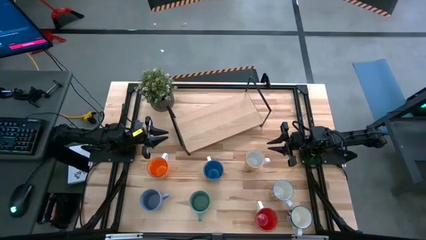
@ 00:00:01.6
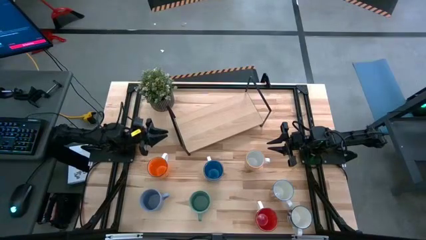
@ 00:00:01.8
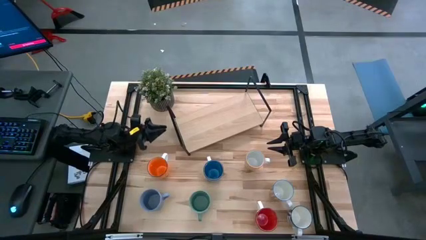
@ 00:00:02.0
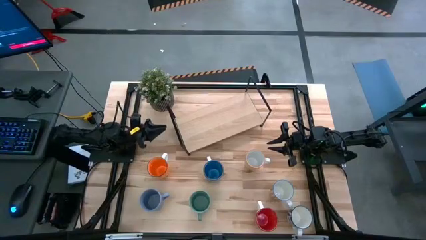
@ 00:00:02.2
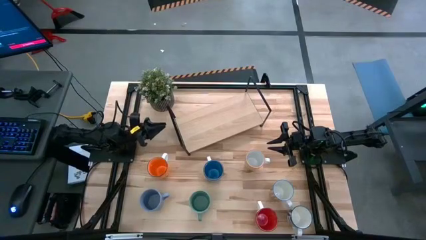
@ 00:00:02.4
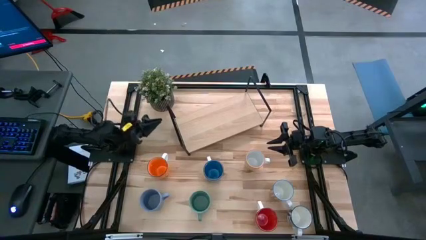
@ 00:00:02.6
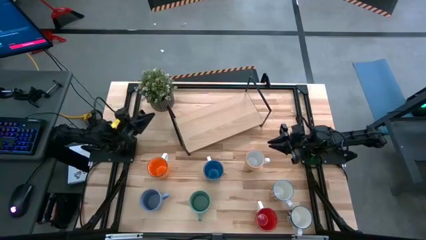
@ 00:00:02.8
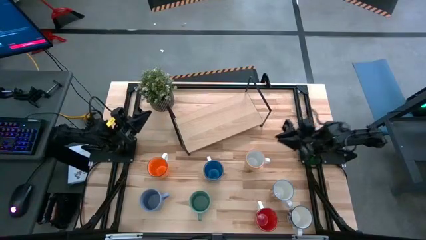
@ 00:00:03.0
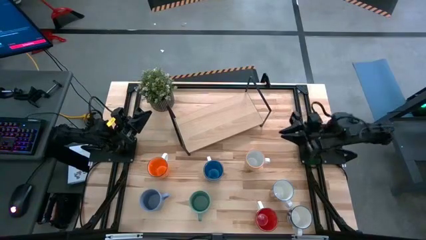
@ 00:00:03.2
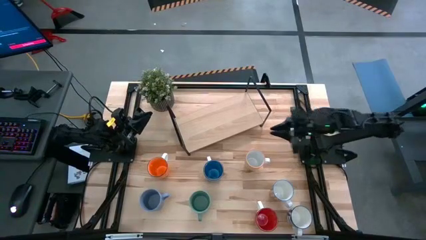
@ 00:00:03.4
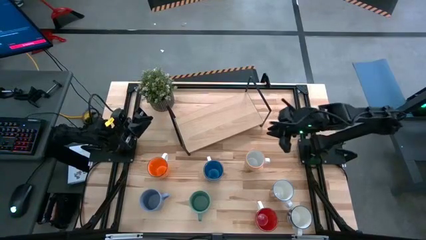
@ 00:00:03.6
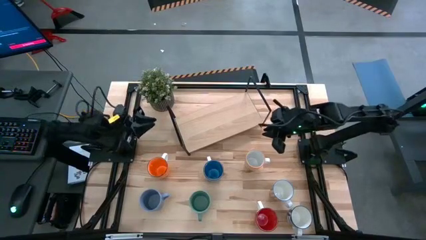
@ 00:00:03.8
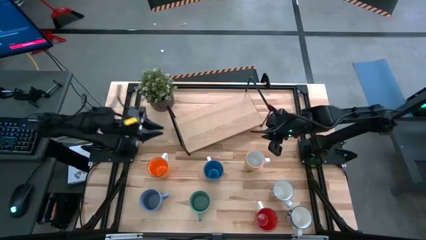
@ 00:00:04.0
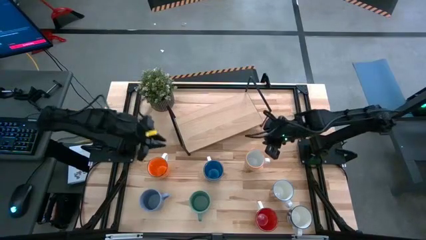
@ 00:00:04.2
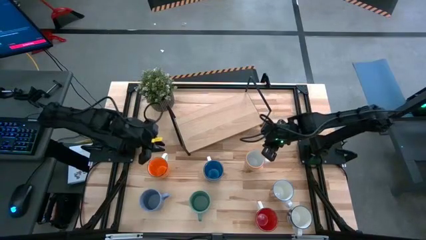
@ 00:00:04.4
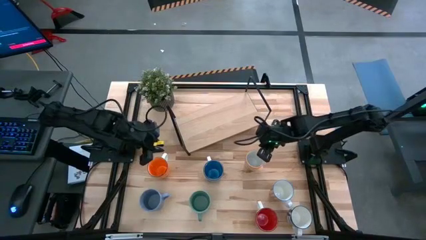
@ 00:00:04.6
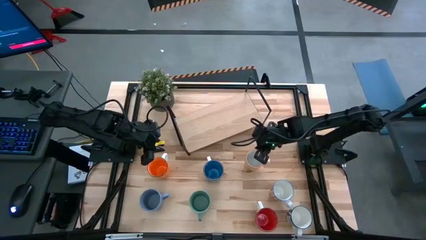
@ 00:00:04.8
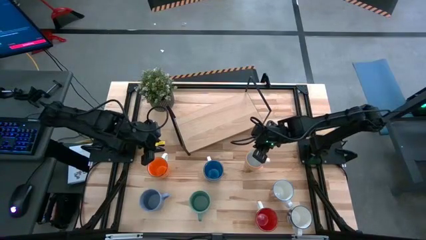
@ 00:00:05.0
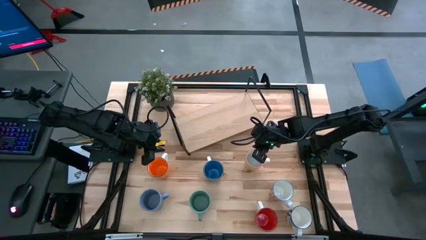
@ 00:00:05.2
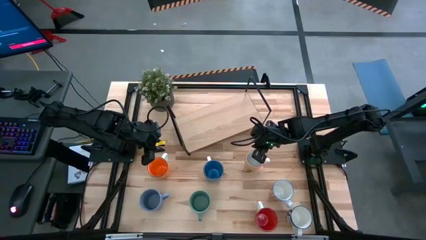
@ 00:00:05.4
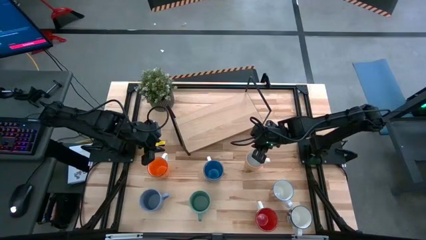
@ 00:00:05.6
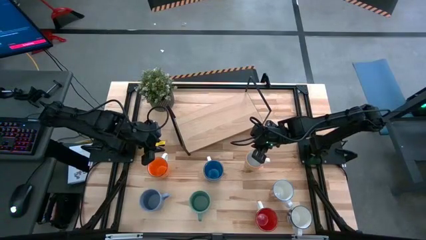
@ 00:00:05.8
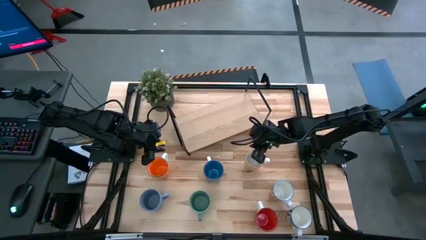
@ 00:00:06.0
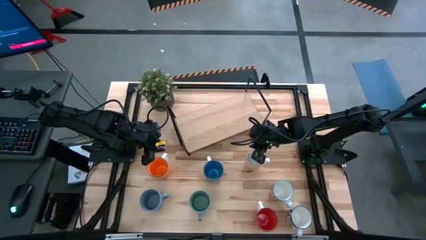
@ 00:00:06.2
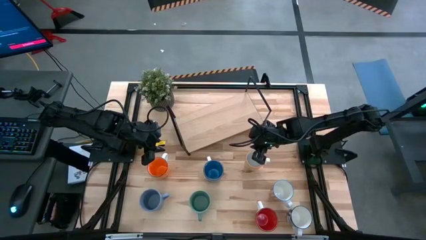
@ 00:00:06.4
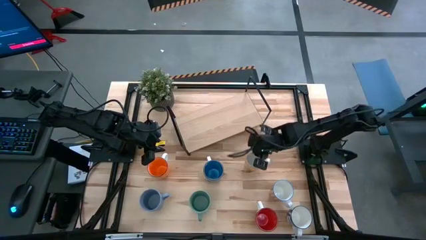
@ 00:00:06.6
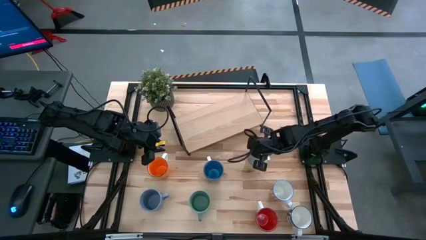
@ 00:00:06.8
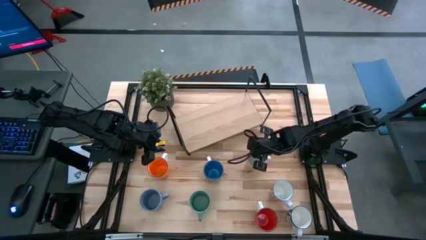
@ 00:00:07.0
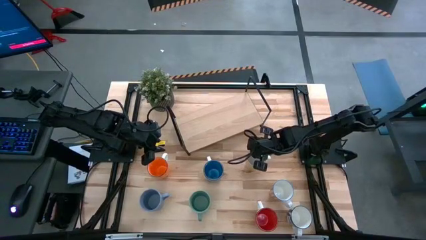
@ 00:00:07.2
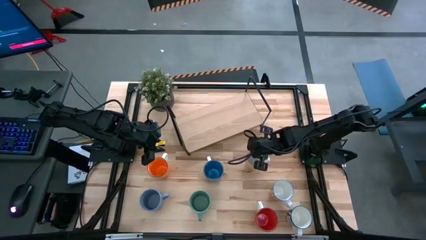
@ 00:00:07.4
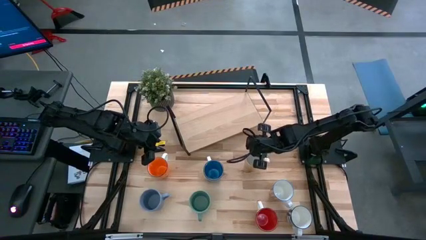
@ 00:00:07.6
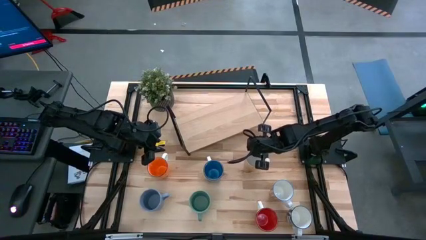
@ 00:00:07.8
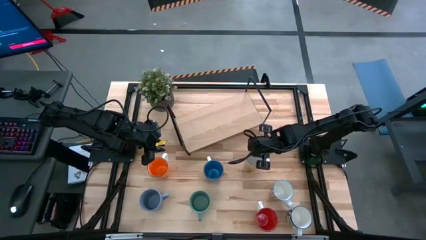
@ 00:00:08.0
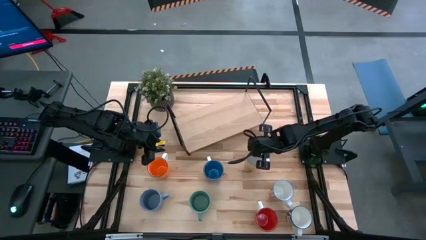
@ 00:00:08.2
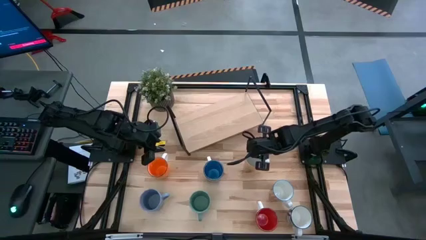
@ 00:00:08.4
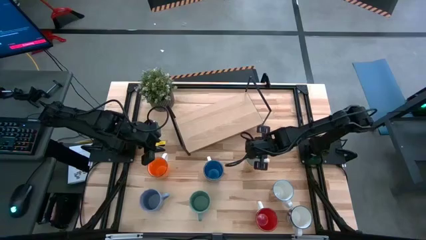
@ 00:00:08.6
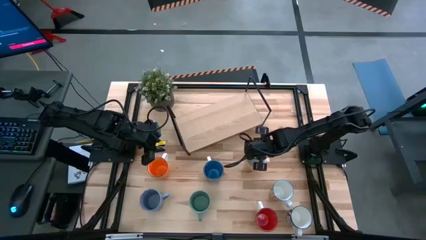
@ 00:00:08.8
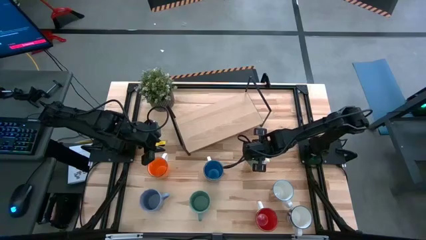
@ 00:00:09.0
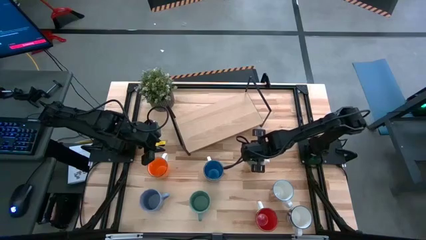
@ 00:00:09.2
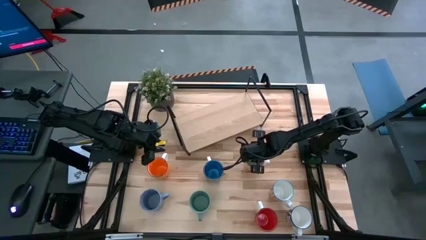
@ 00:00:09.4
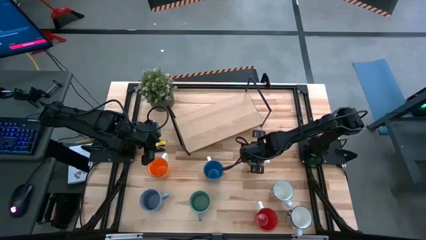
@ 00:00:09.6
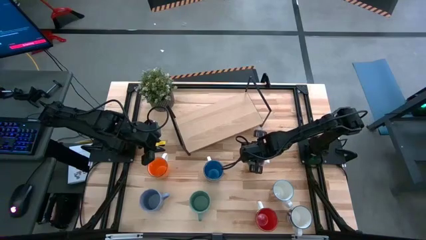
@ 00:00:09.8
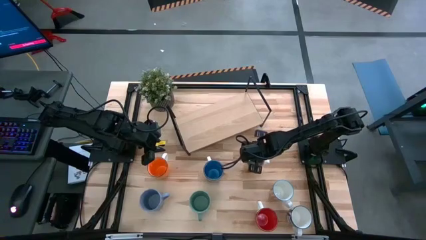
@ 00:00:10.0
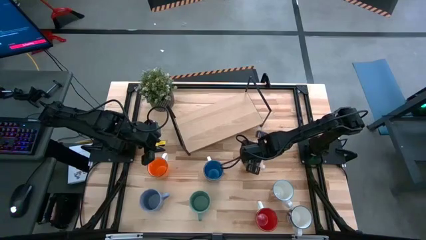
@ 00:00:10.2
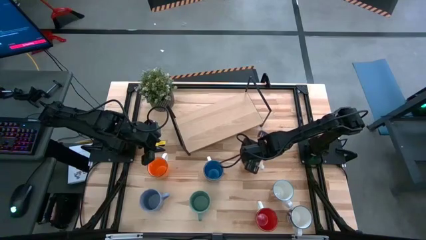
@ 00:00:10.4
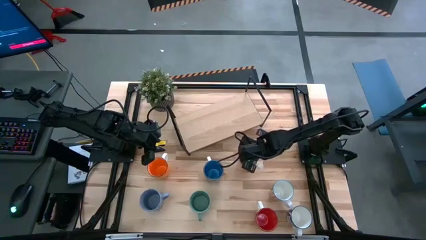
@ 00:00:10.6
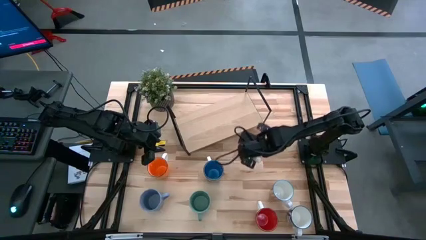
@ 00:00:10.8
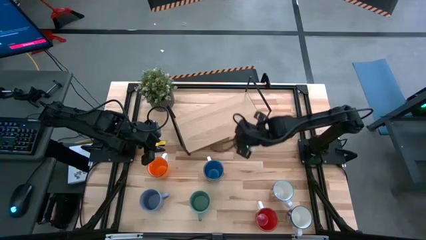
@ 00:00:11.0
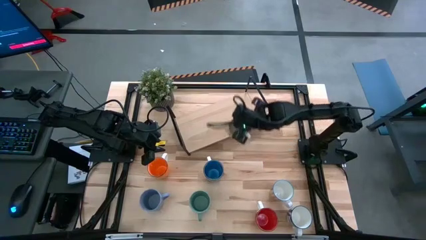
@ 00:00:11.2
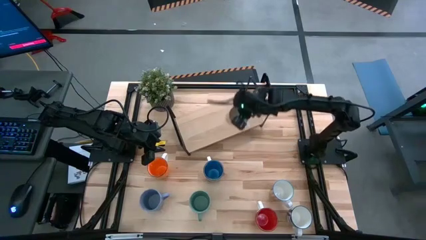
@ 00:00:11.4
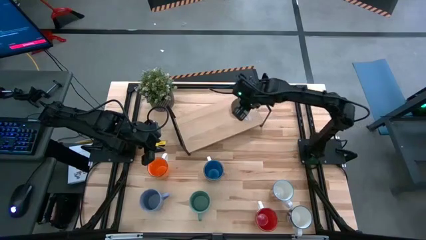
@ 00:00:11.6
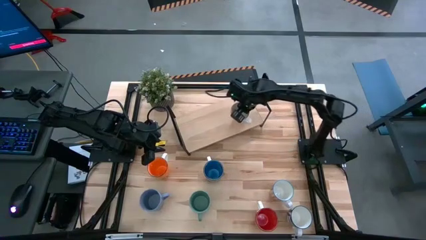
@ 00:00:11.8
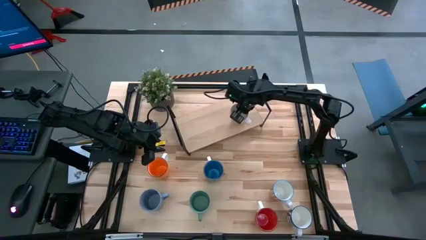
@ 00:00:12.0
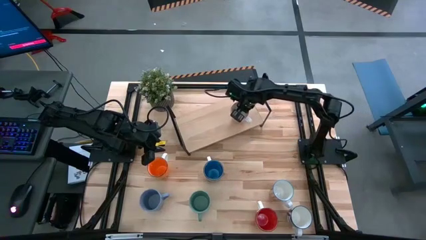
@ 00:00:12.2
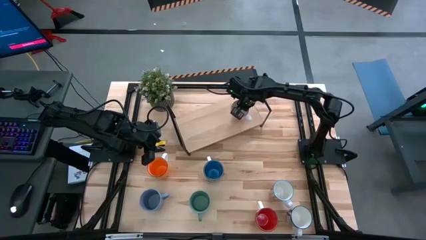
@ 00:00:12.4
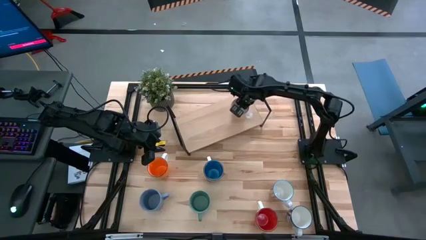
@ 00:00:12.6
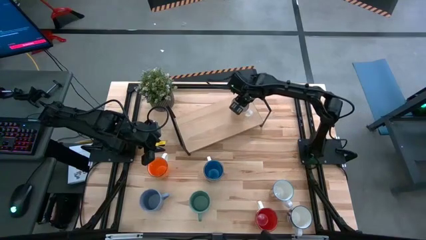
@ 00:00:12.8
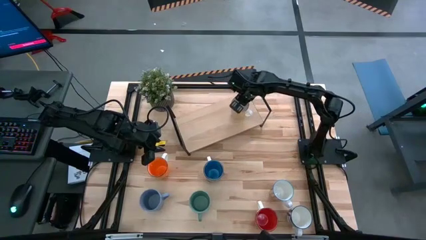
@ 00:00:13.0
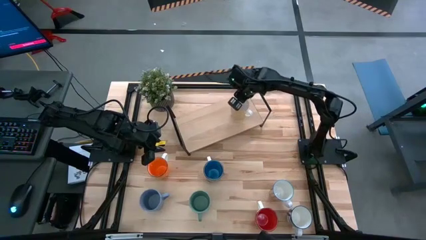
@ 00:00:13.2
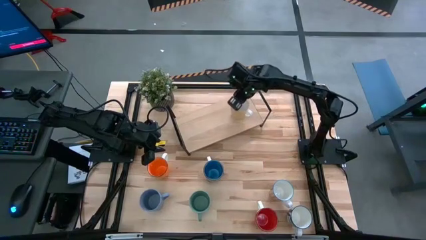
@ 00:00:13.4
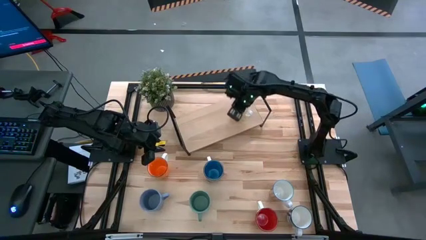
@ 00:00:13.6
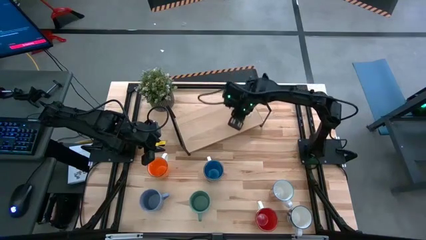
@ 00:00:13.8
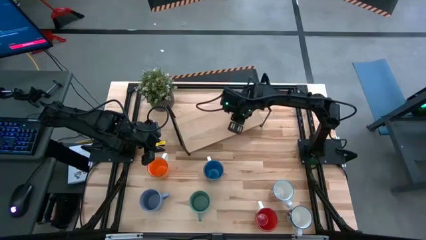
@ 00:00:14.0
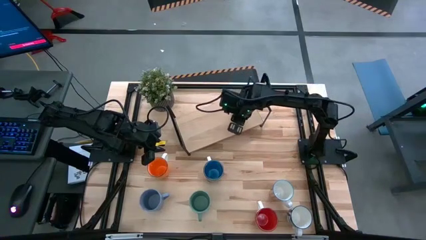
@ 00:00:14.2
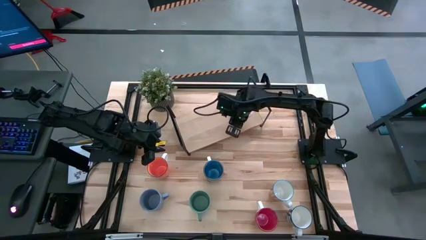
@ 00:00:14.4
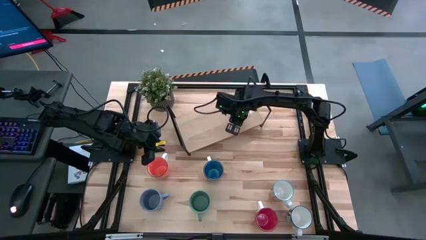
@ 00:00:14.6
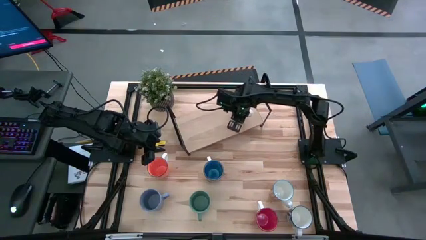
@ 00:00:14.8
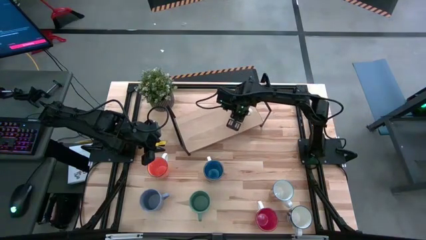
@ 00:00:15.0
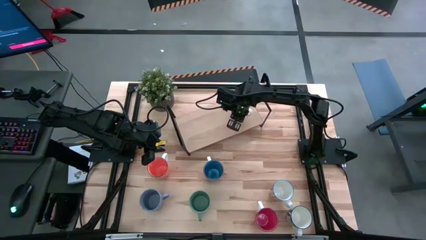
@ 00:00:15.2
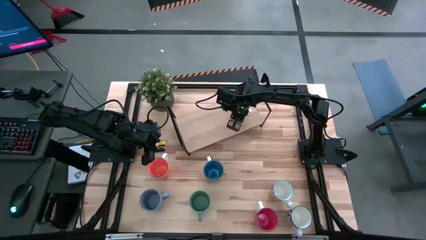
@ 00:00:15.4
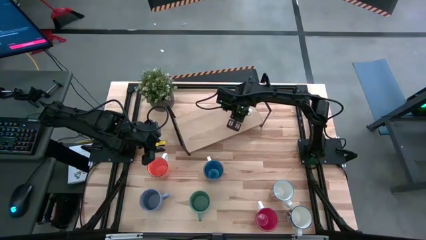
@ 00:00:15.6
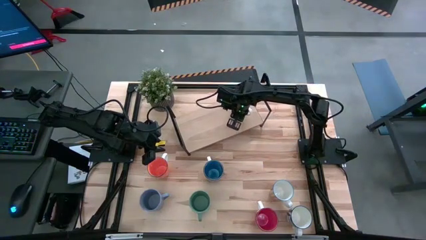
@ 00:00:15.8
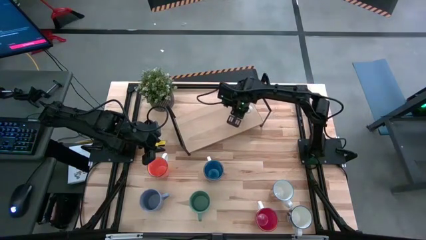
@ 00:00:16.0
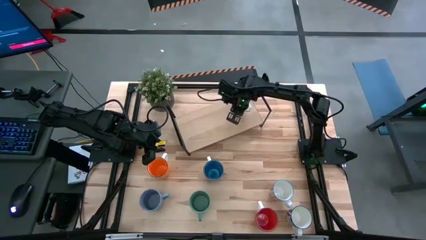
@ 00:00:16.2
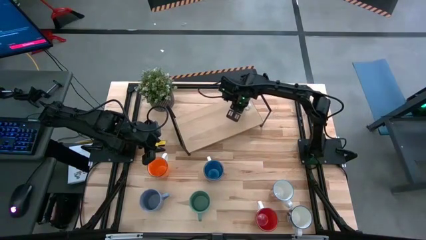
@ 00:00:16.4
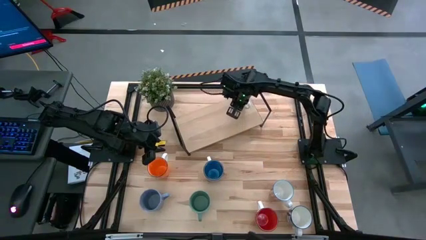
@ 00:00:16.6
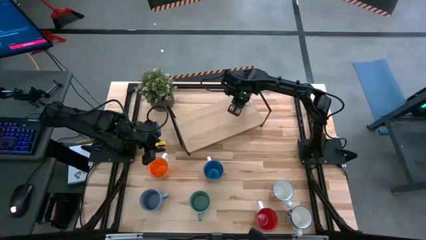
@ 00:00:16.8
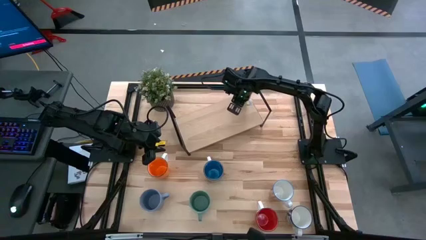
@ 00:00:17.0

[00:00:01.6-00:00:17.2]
Task: Place coffee mugs
Put the yellow patterned mug on the shelf
